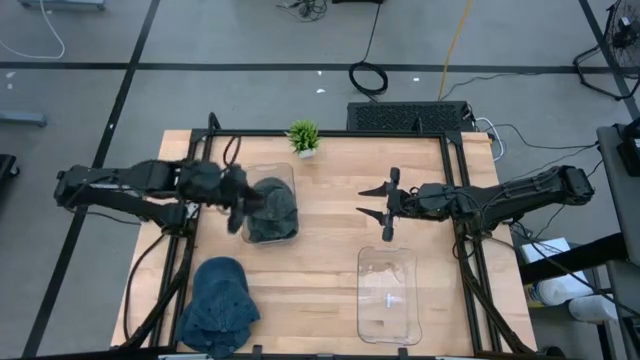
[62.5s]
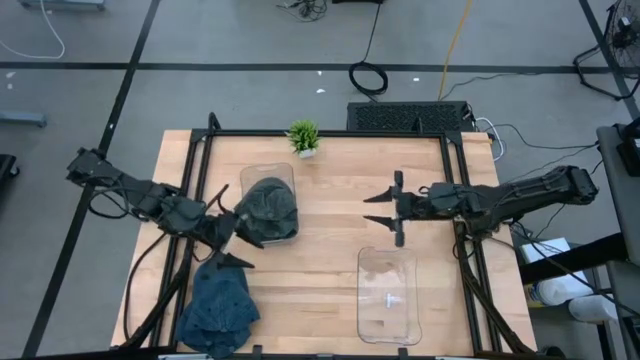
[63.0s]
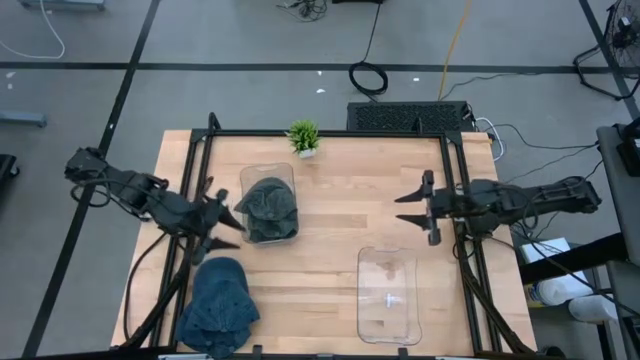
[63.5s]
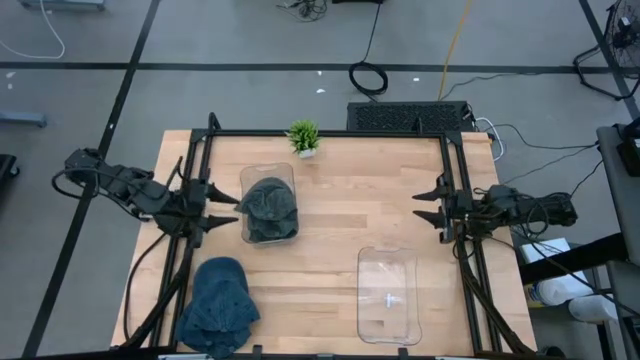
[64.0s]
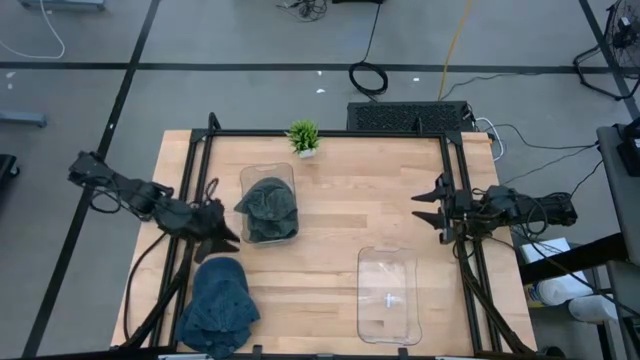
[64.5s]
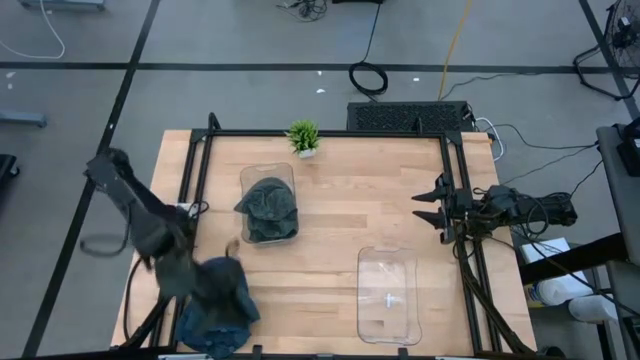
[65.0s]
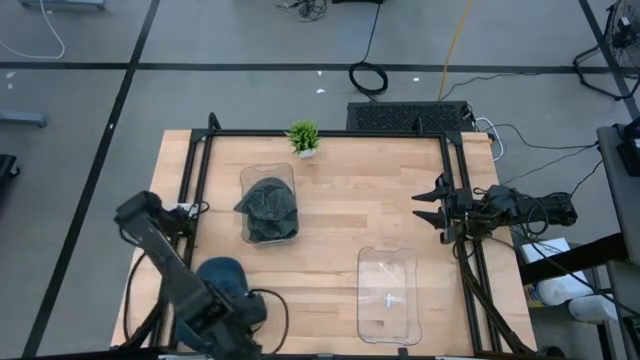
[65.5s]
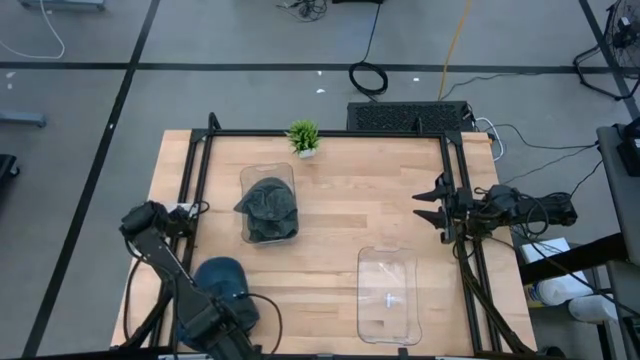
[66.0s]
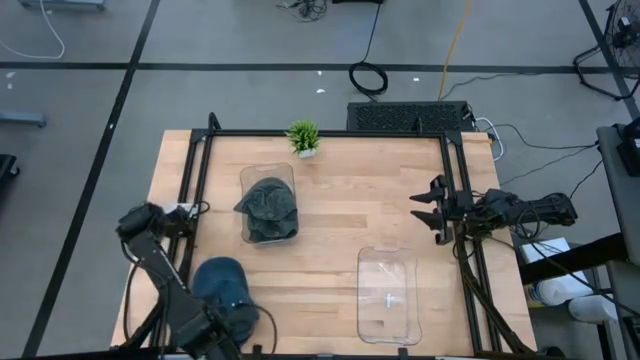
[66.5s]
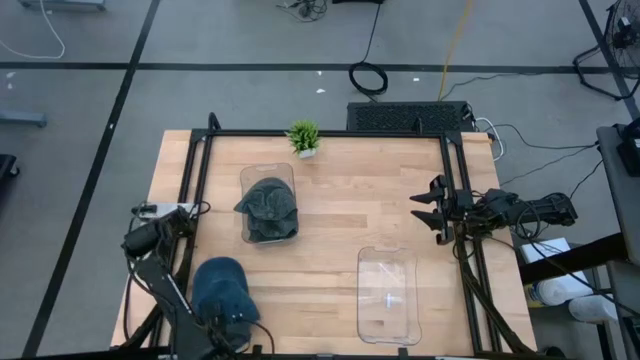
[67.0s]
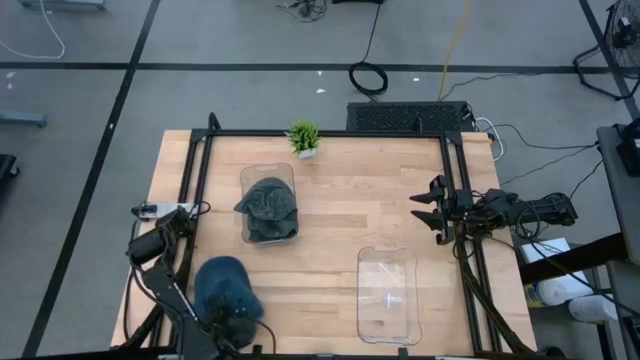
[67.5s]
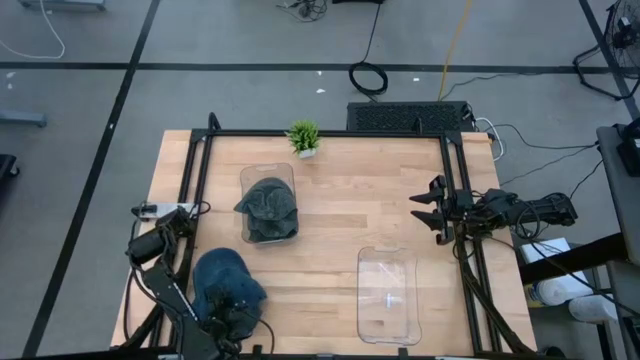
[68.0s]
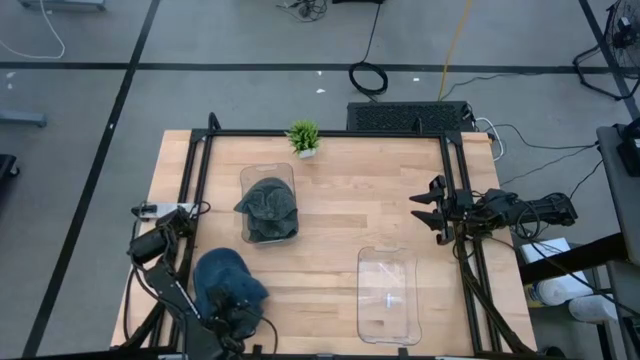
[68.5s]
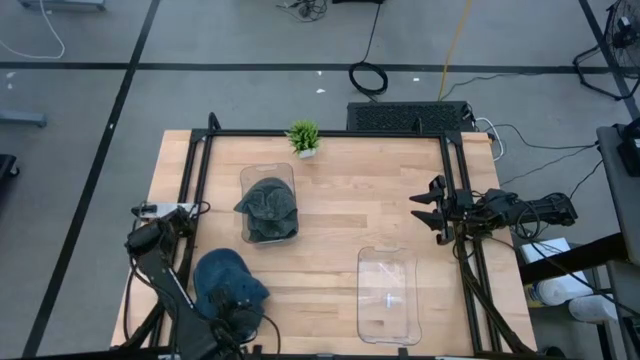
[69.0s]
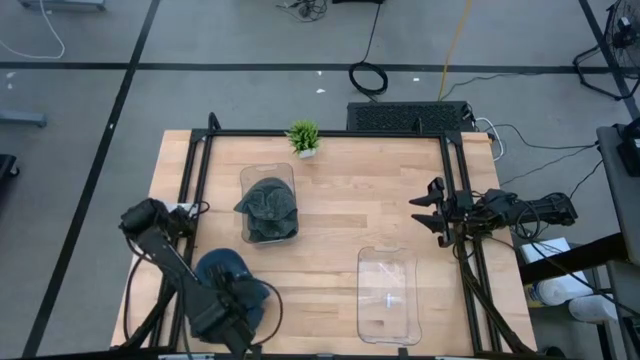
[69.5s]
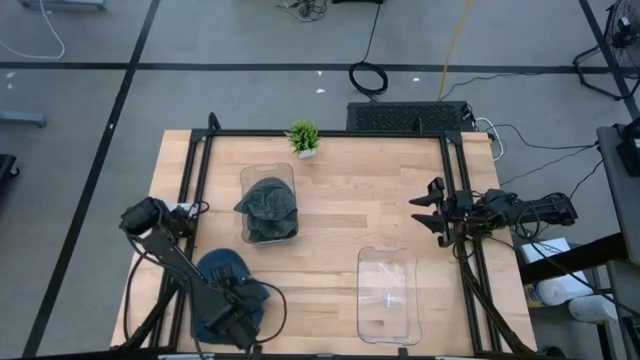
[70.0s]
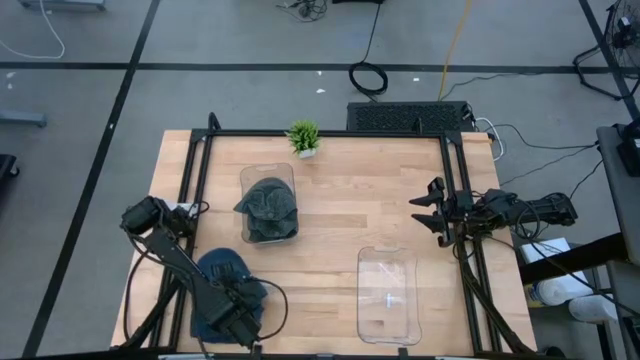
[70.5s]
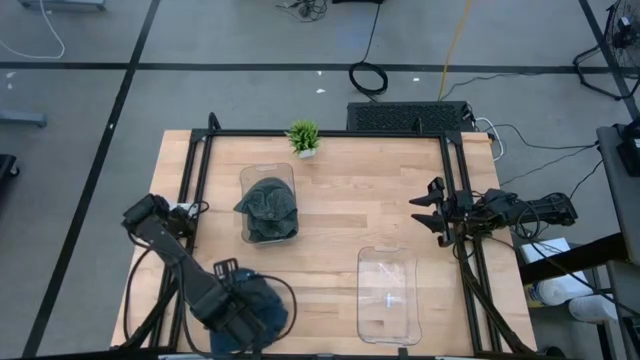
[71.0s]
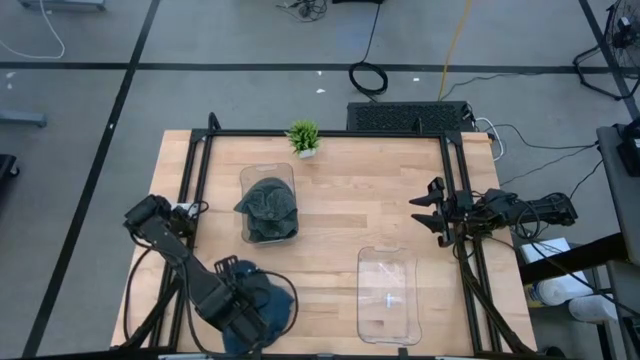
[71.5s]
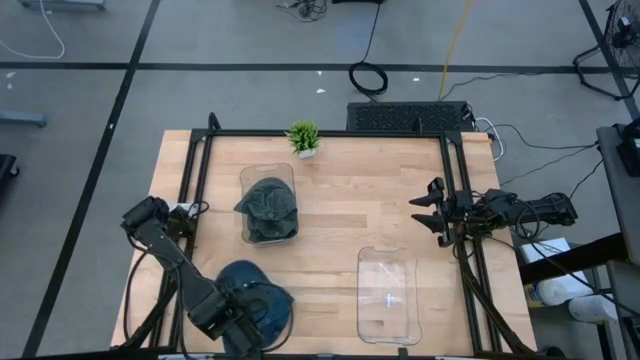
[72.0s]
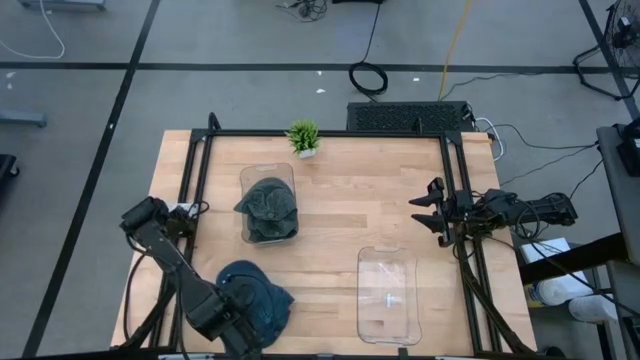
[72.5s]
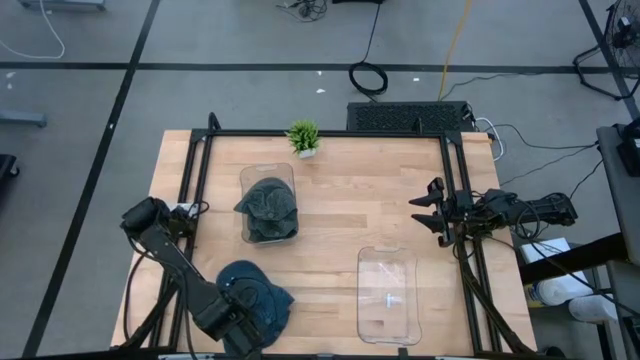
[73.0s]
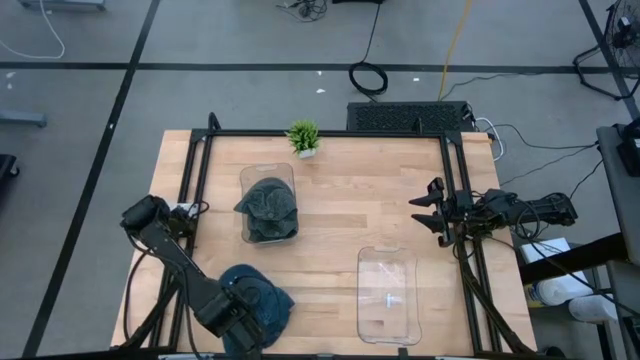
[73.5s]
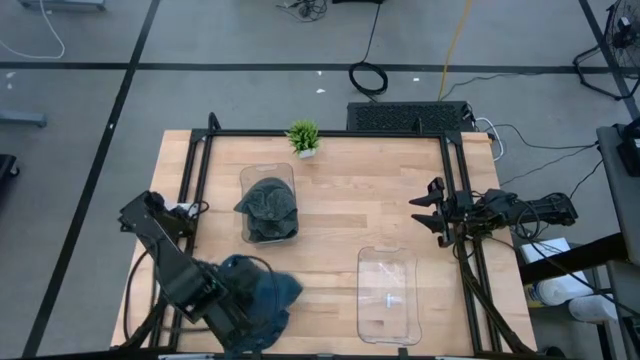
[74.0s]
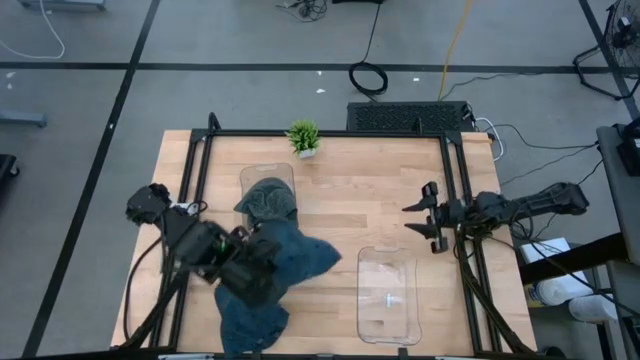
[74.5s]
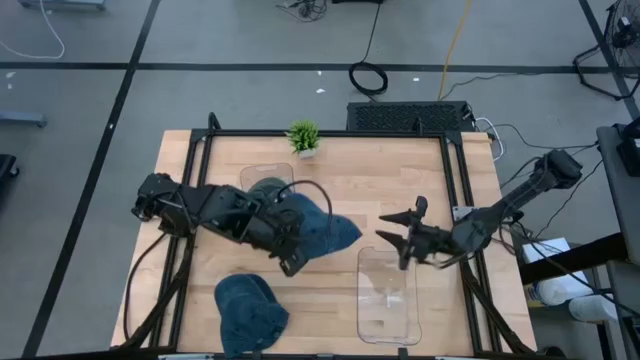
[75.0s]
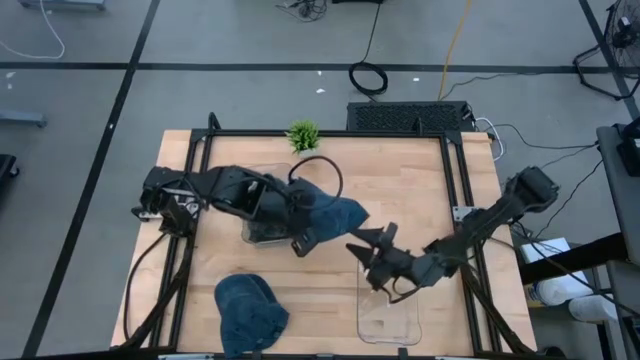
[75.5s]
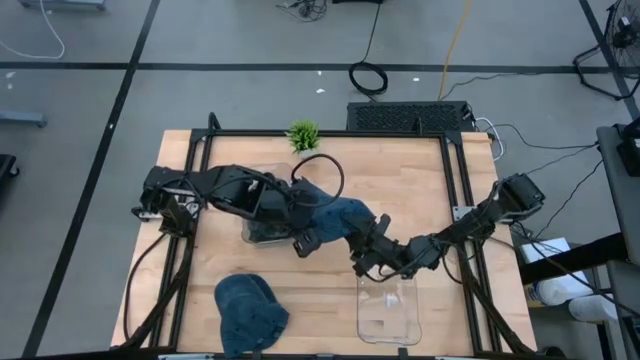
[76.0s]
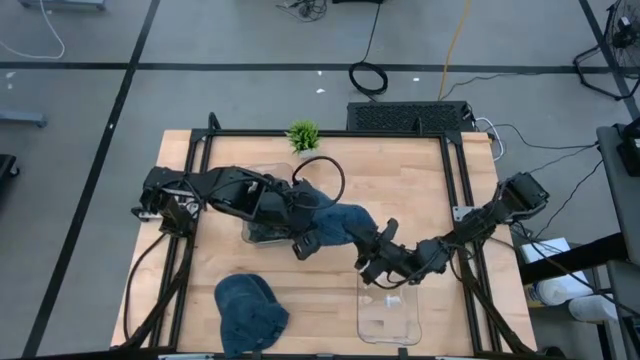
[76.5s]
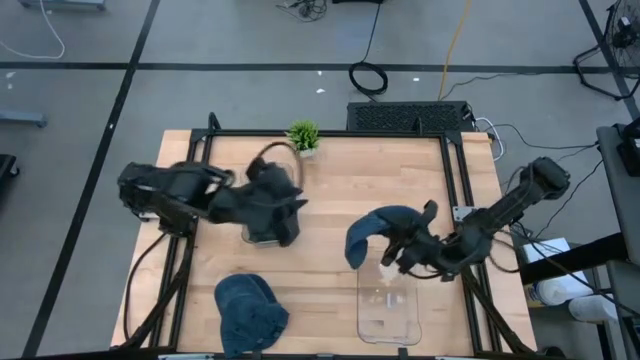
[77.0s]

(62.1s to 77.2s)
Task: Pick & Place hat
Put the blue cap into the bottom transparent bin

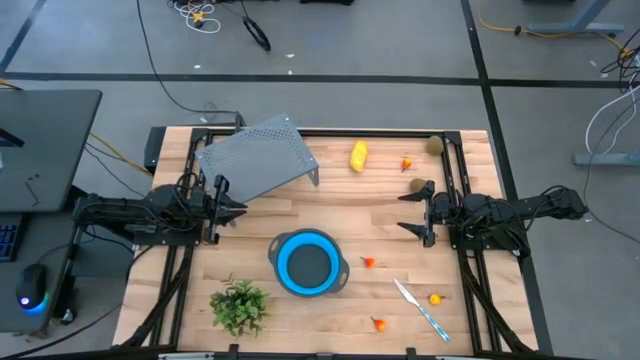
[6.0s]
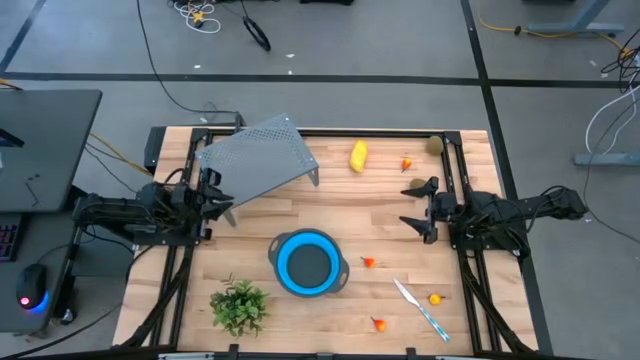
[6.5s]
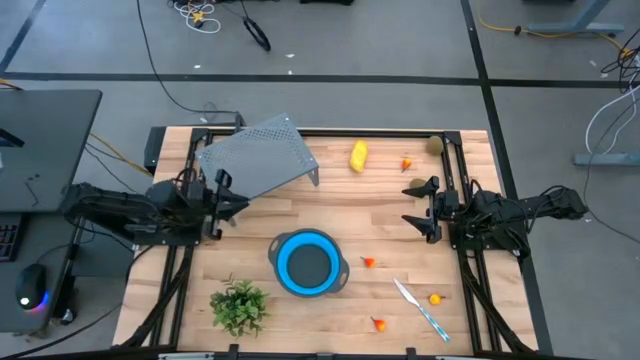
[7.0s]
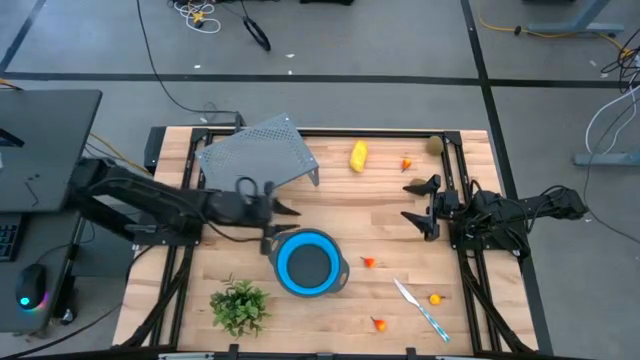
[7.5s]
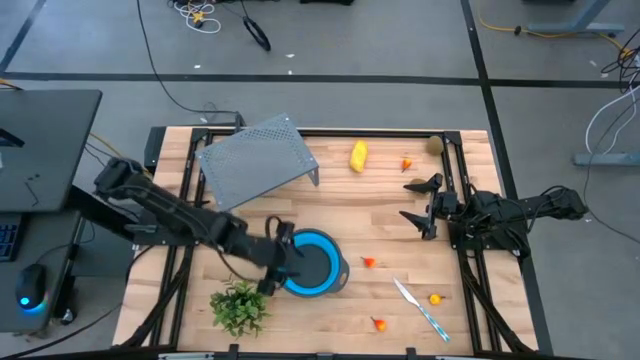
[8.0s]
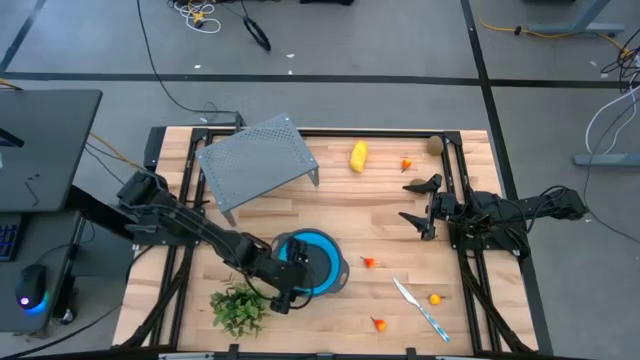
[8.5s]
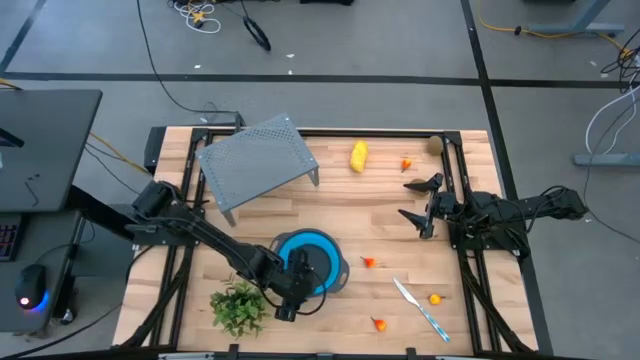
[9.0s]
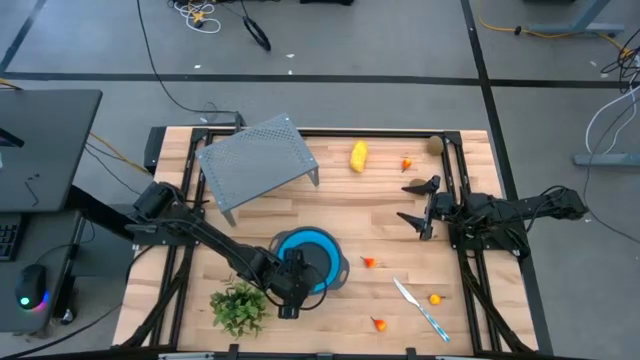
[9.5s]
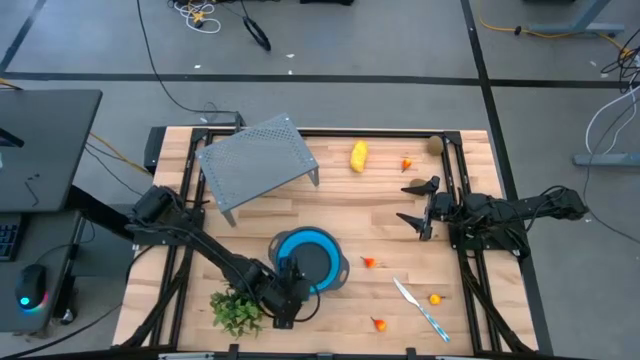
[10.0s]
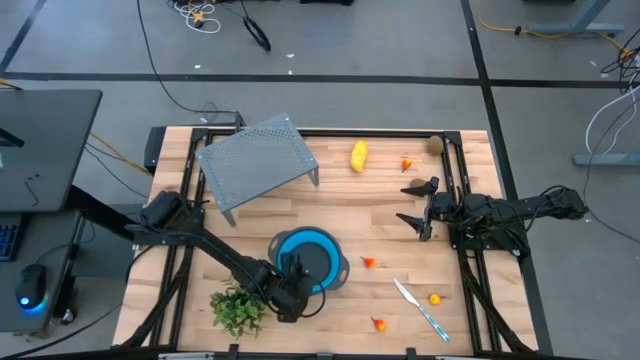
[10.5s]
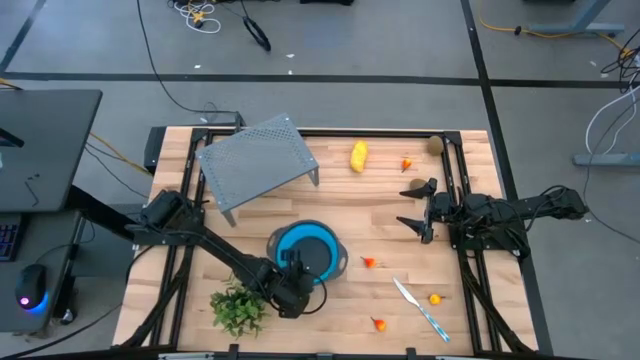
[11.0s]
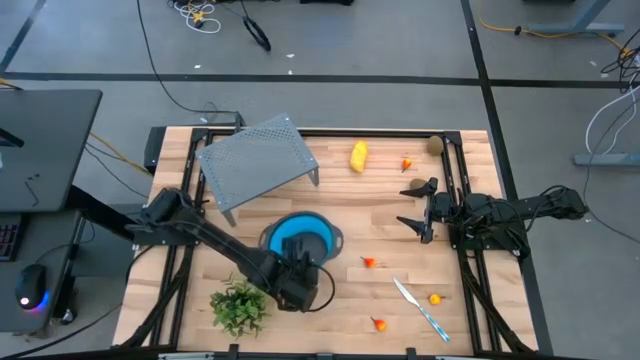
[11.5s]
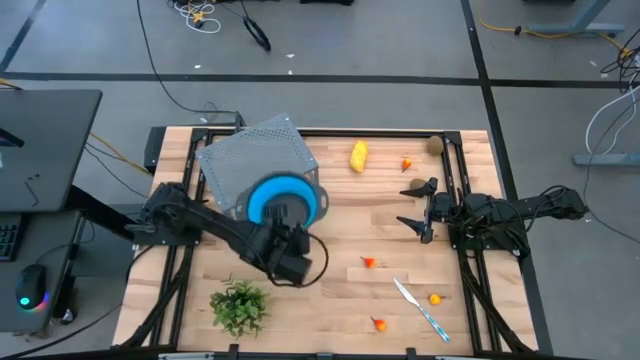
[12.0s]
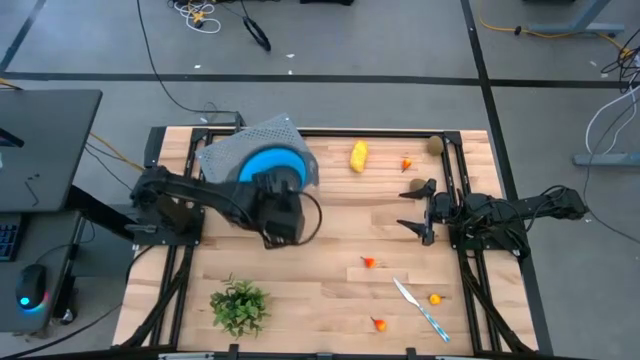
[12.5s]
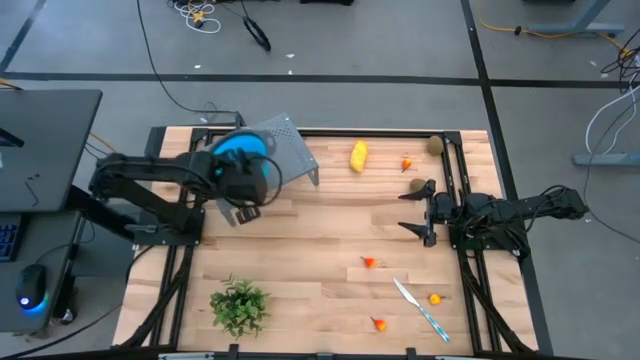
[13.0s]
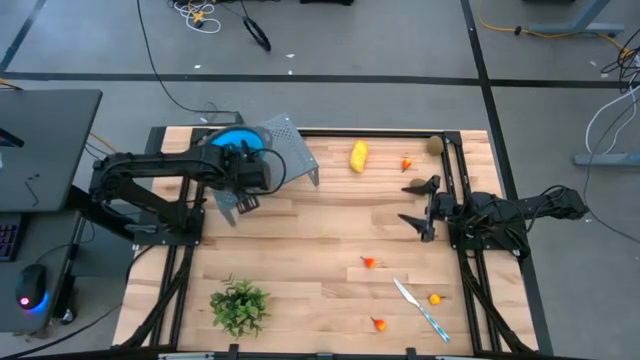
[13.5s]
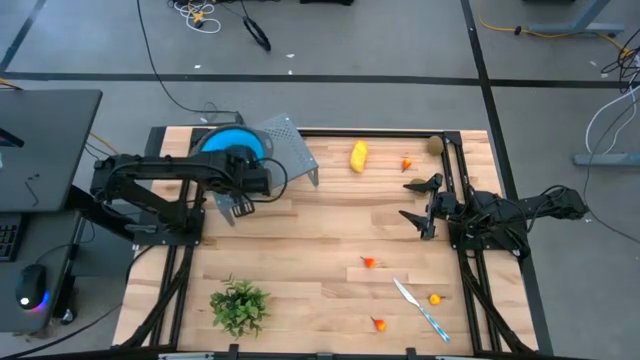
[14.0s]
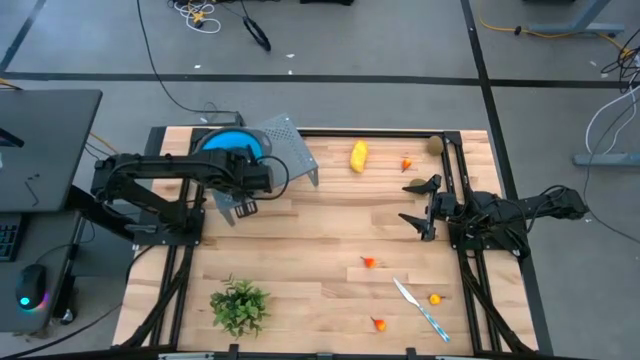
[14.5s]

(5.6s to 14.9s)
Task: Pick & Place Fruit
Put the blue strainer bowl on the shelf
